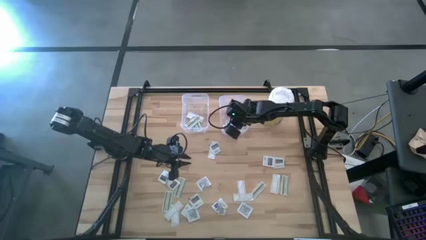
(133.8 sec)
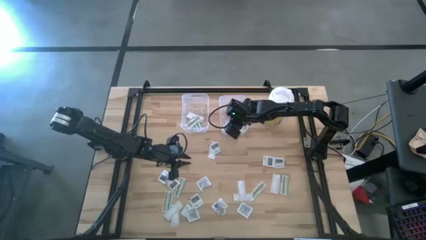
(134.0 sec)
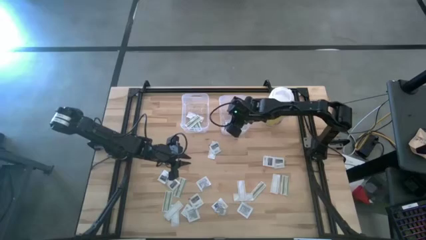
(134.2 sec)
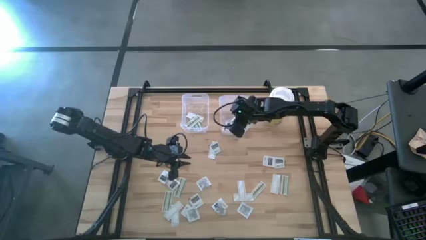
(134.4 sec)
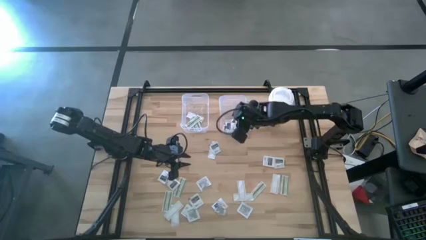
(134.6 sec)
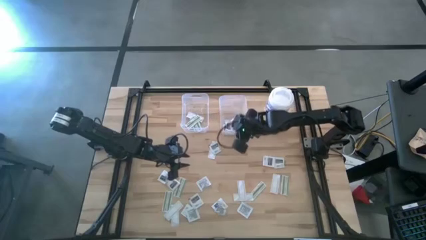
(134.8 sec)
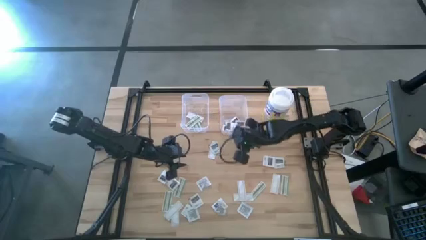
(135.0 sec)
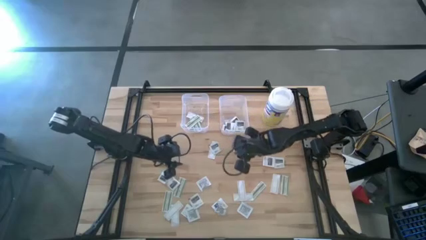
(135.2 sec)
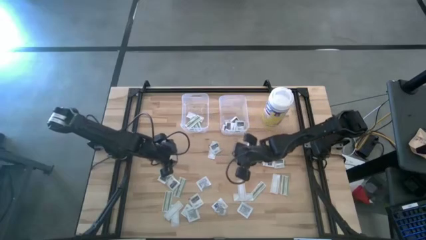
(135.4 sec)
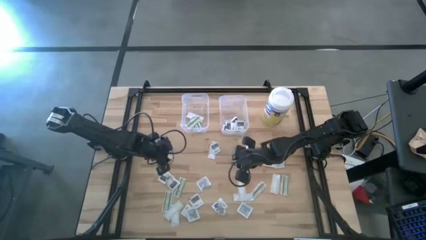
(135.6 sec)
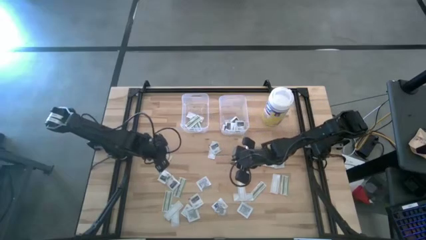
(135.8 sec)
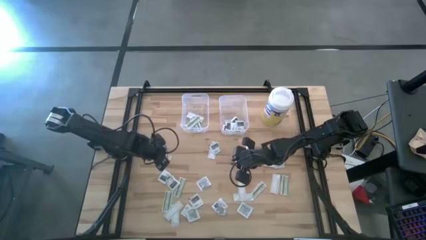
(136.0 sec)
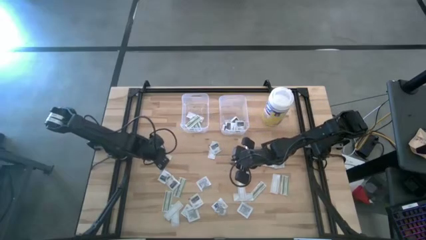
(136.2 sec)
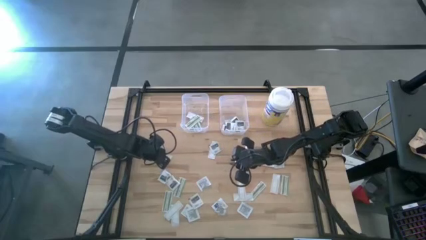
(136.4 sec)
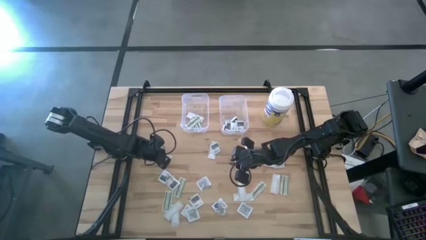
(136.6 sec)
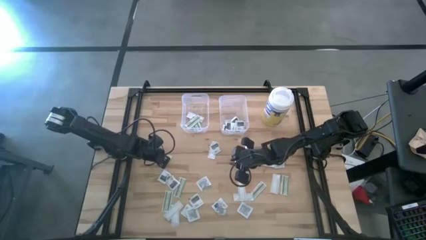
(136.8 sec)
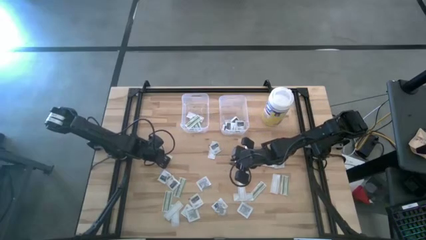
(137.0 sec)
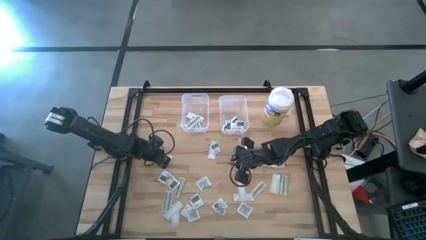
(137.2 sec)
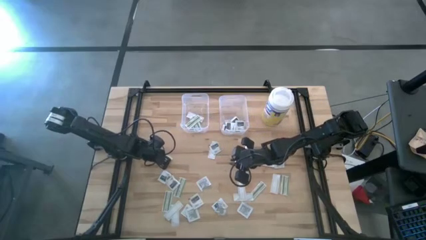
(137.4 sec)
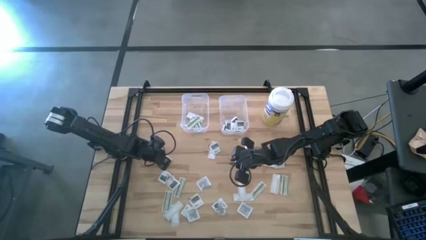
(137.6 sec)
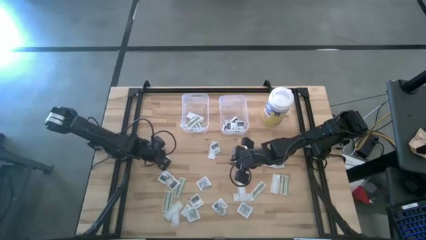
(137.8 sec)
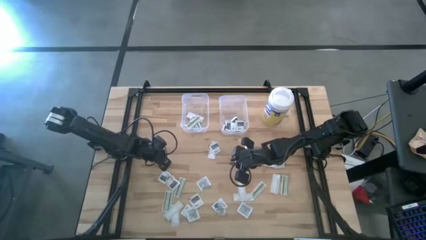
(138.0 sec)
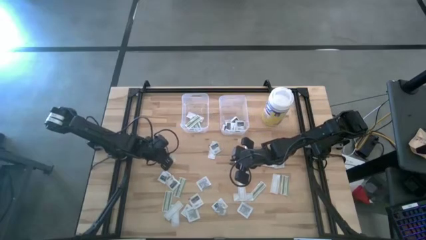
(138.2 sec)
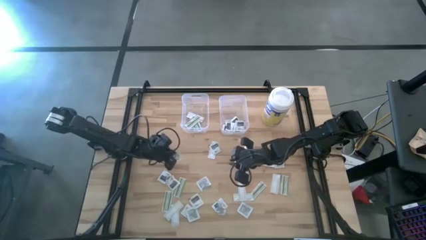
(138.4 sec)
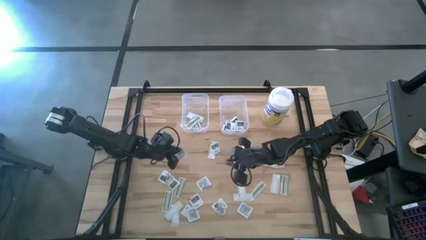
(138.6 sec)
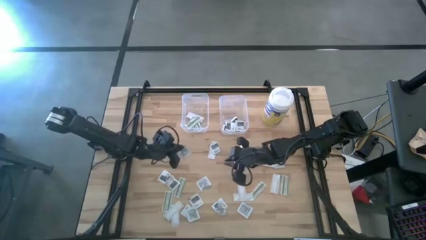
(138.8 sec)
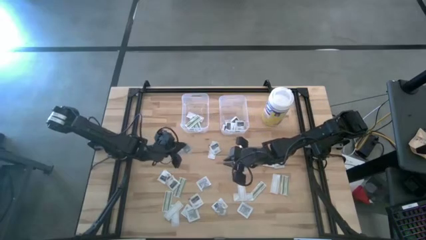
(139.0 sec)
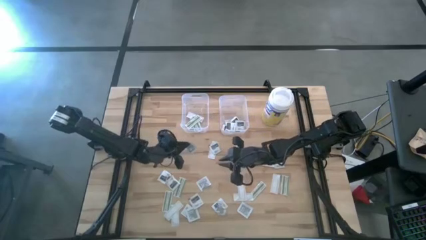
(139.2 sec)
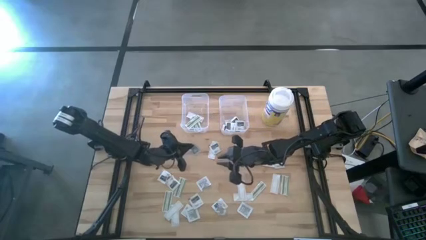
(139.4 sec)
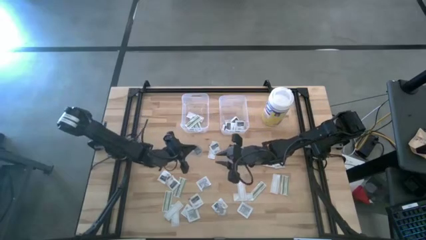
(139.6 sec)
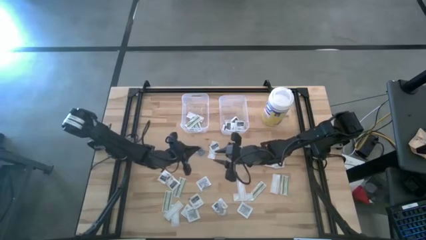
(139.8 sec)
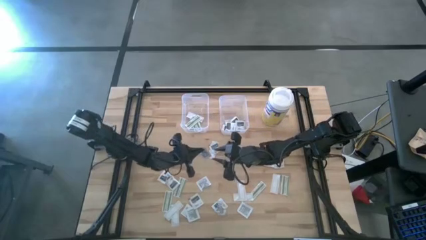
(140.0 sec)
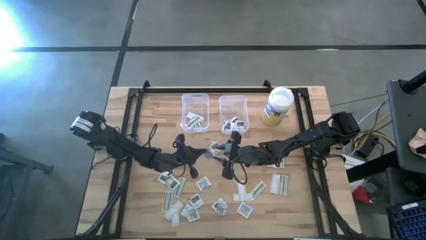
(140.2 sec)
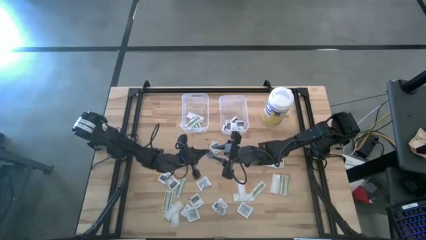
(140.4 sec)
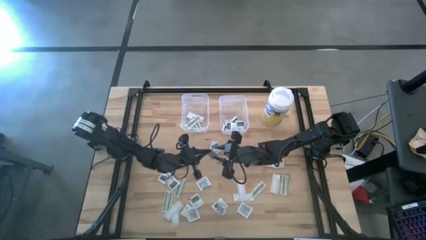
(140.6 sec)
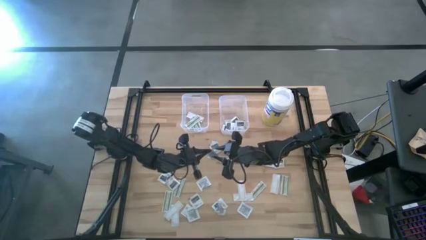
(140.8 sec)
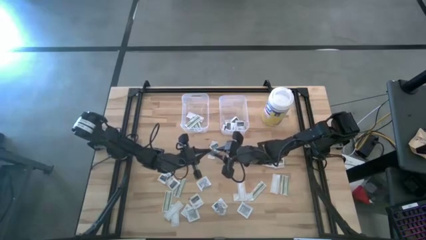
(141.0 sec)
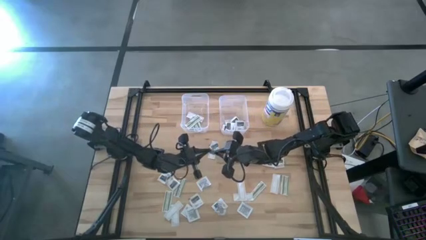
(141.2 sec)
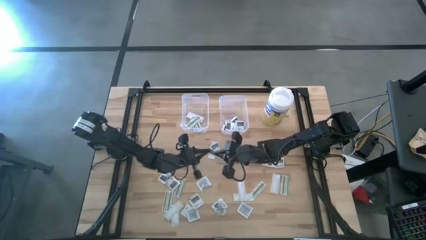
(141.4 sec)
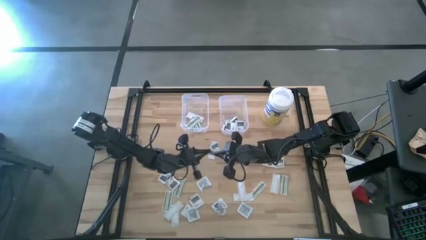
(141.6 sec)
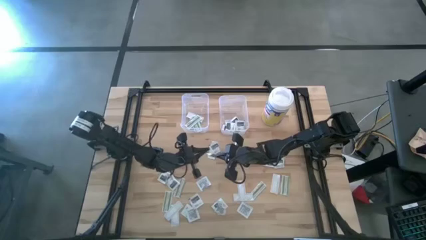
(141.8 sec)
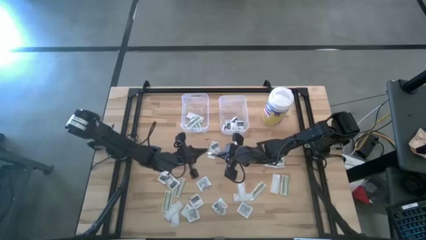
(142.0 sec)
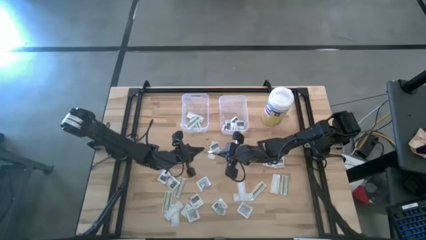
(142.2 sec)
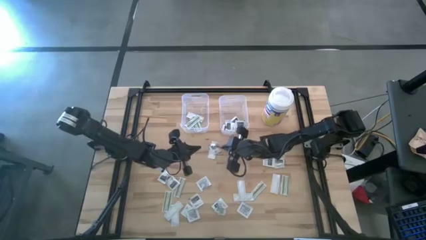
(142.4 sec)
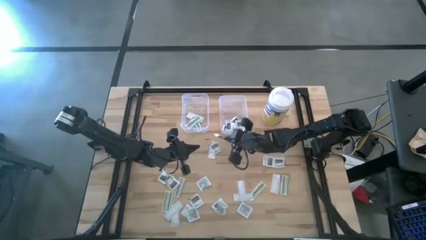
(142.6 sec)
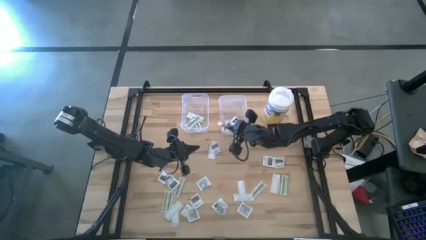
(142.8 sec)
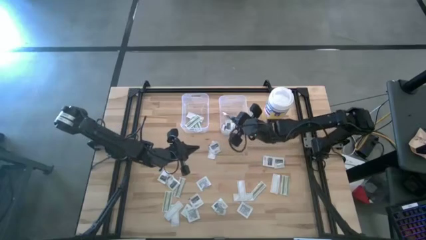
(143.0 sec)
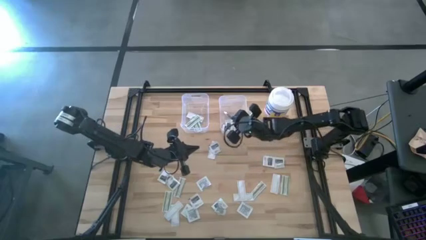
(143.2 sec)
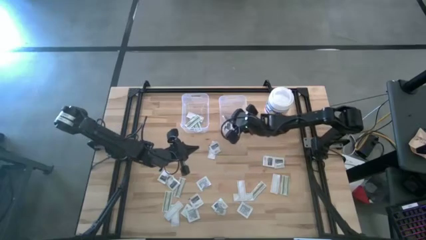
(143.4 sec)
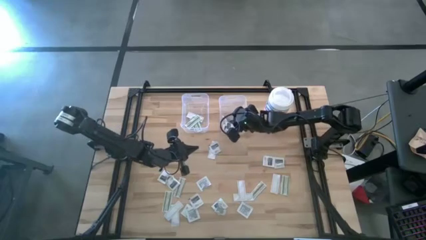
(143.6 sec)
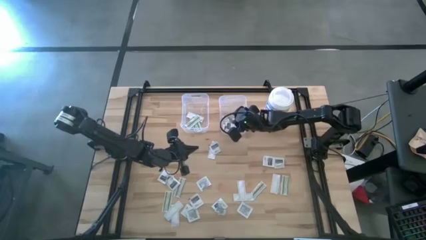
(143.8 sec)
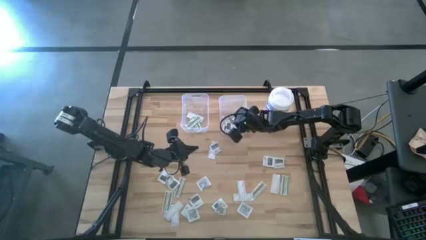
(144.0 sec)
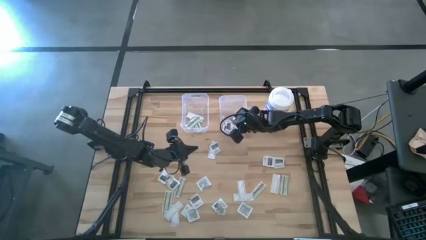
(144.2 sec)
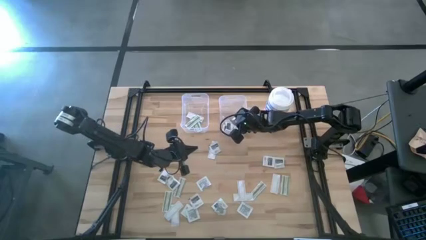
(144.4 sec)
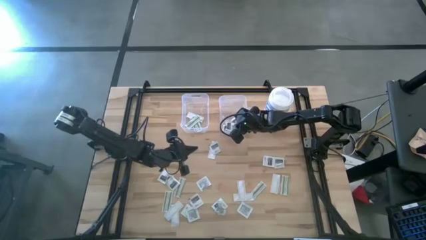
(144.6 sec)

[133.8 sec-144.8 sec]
Task: Pick & Place First Aid Supplies
Put the gray towelette pack into the right transparent bin
